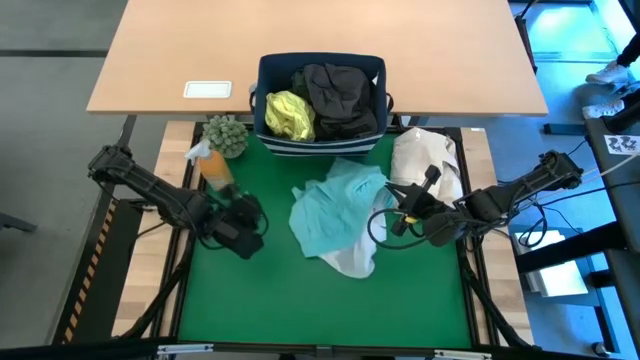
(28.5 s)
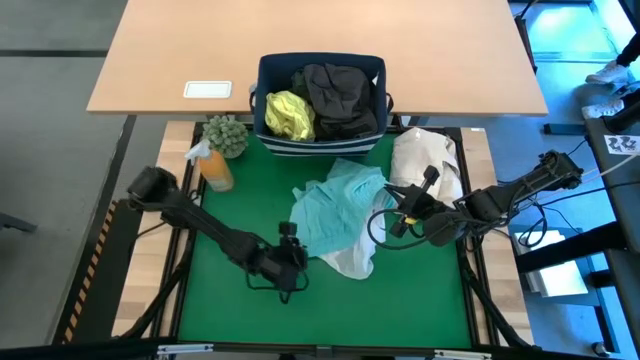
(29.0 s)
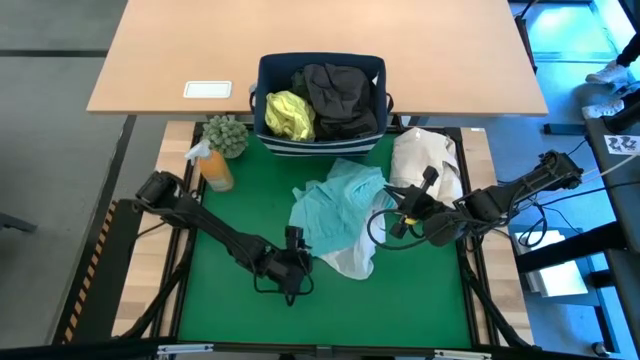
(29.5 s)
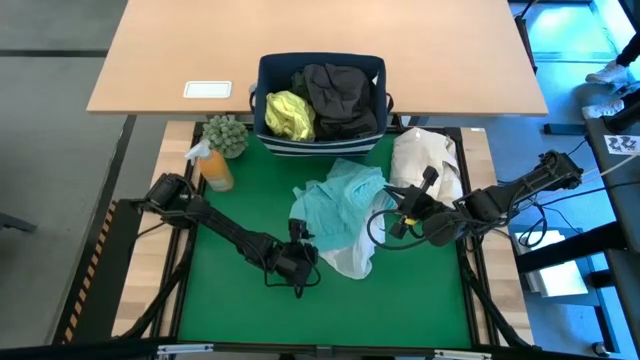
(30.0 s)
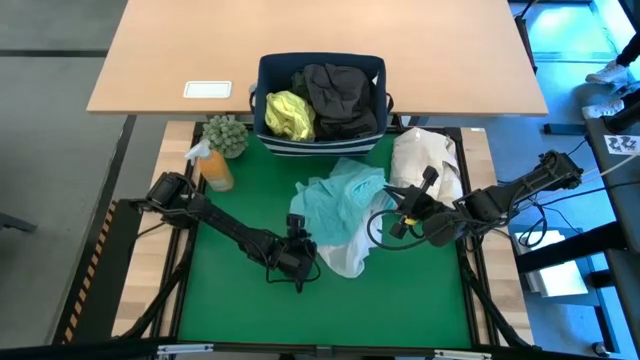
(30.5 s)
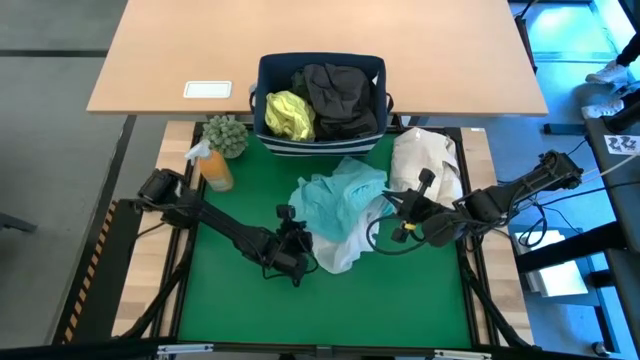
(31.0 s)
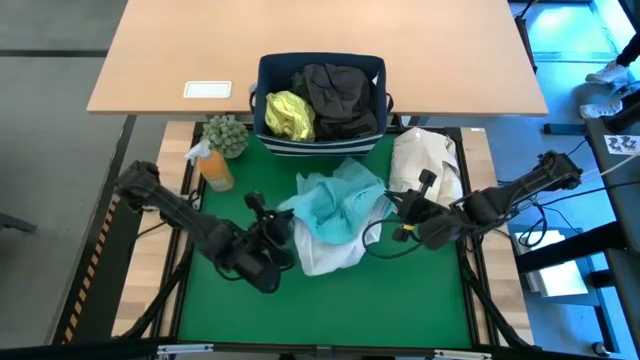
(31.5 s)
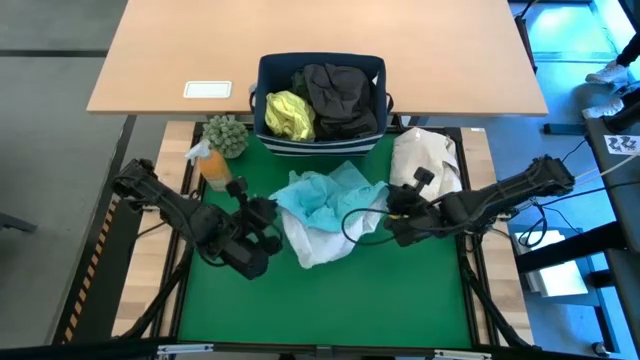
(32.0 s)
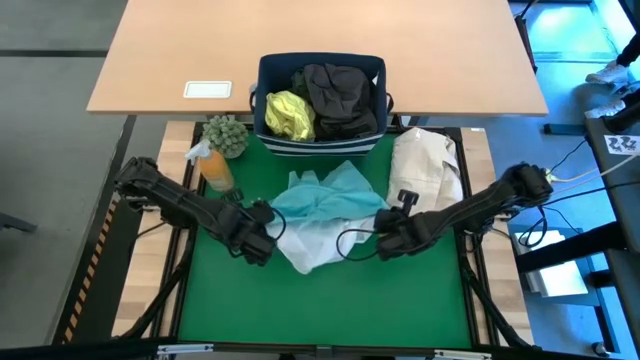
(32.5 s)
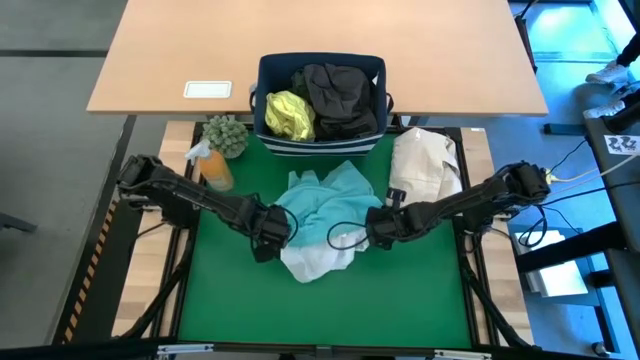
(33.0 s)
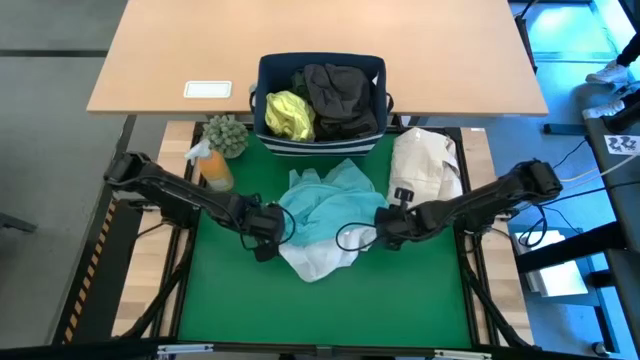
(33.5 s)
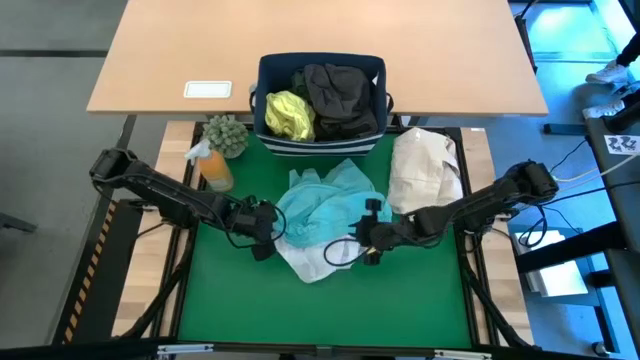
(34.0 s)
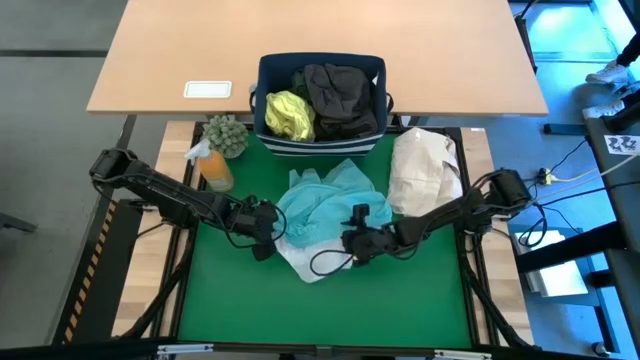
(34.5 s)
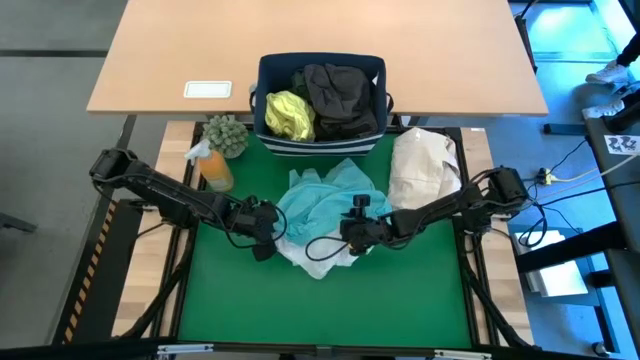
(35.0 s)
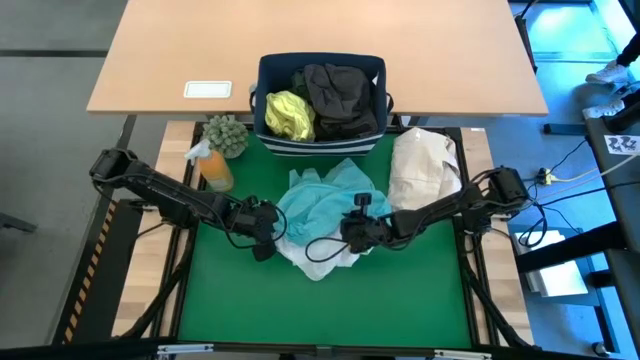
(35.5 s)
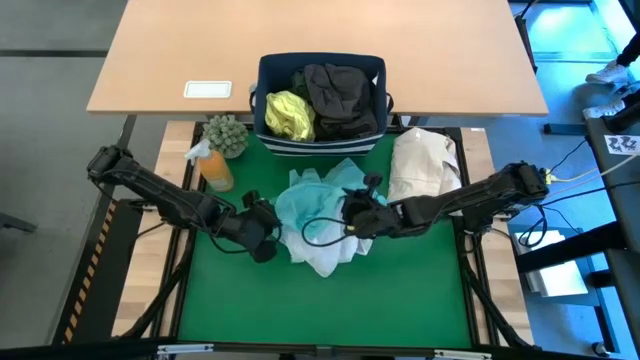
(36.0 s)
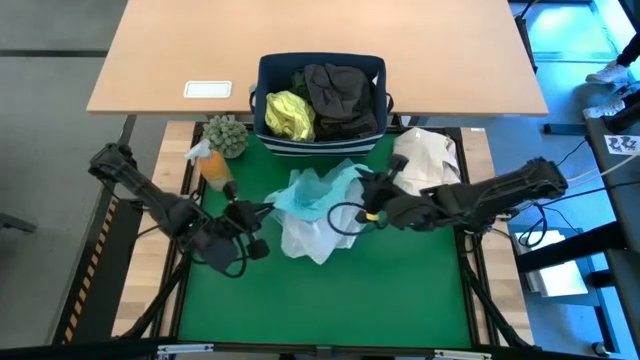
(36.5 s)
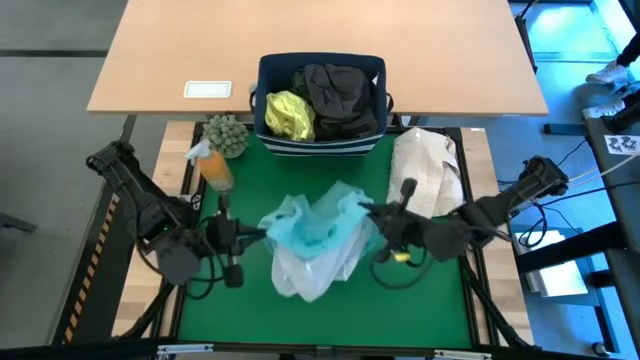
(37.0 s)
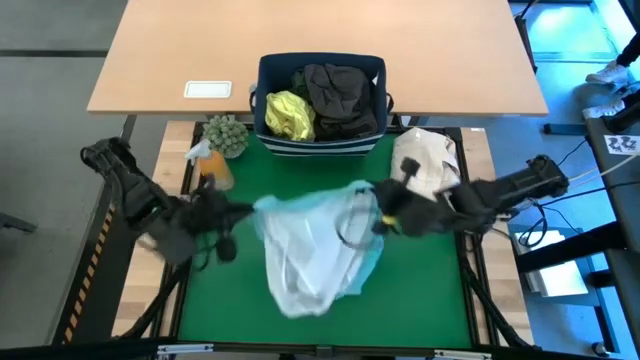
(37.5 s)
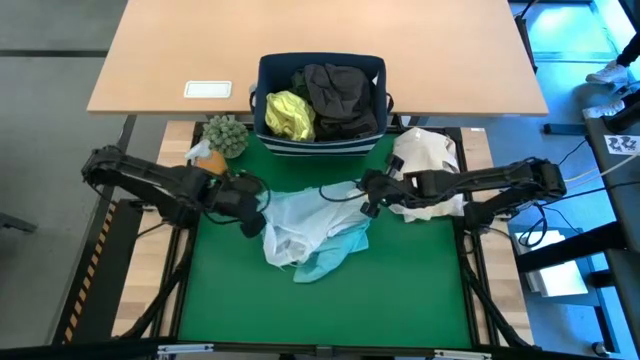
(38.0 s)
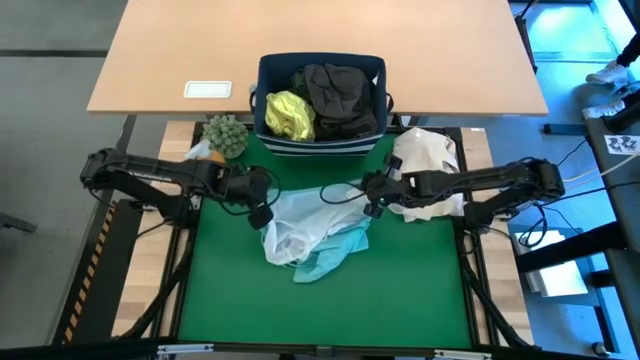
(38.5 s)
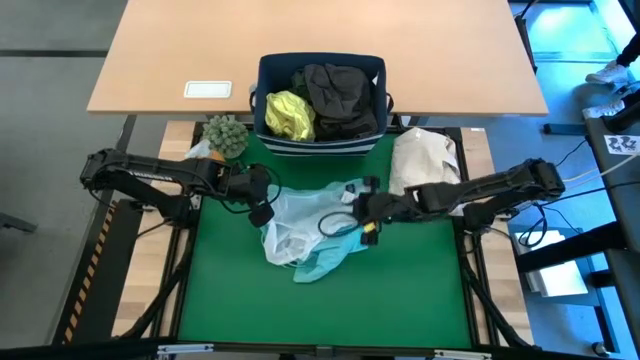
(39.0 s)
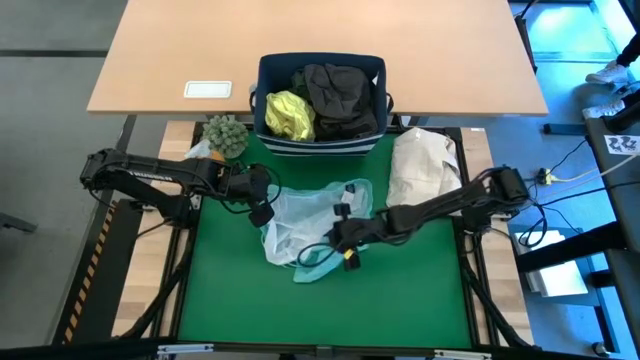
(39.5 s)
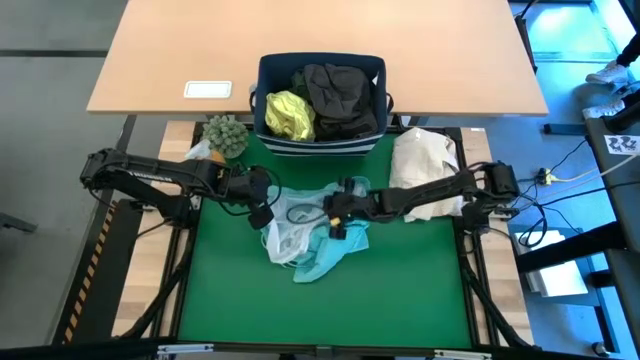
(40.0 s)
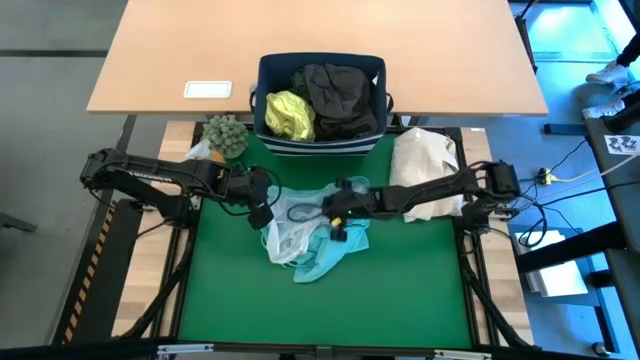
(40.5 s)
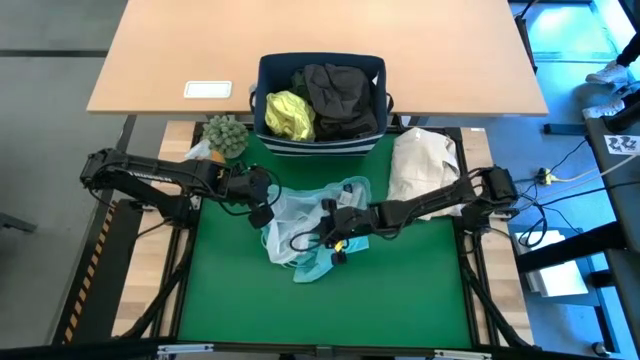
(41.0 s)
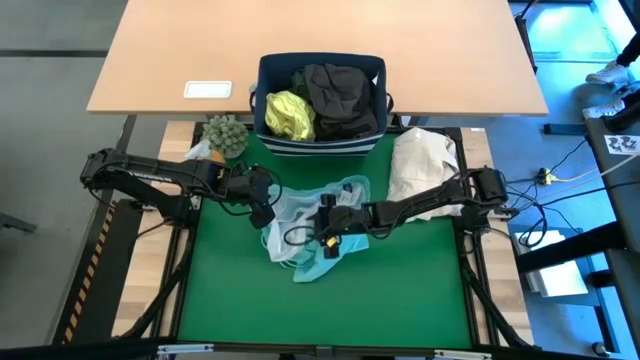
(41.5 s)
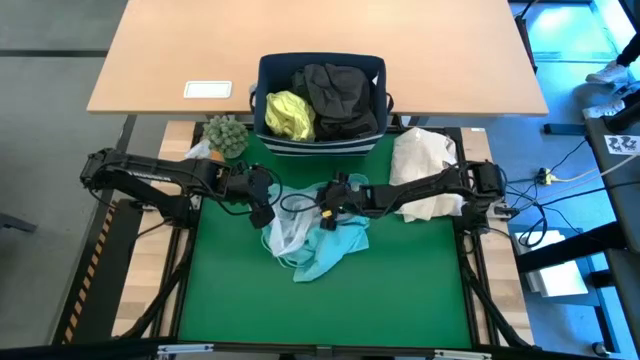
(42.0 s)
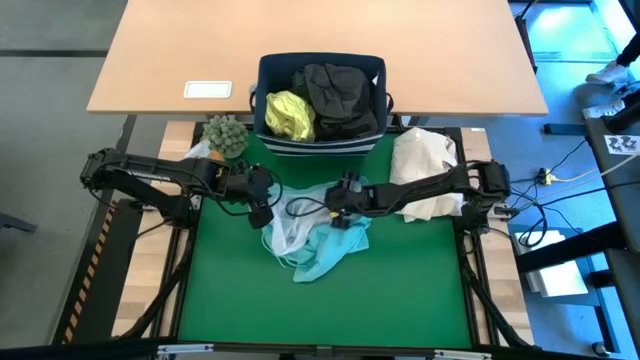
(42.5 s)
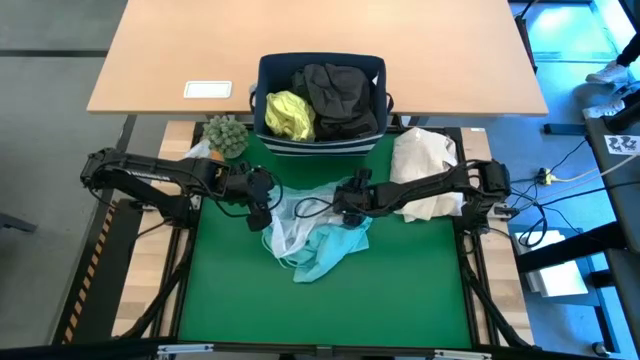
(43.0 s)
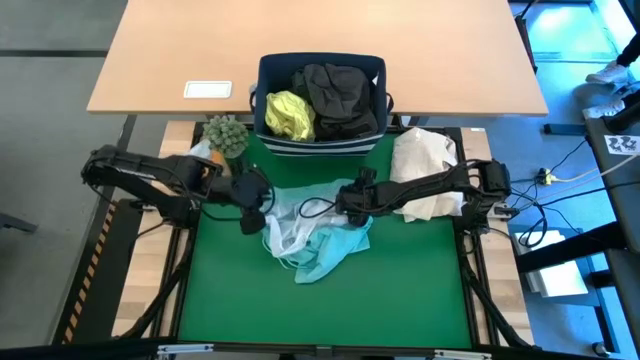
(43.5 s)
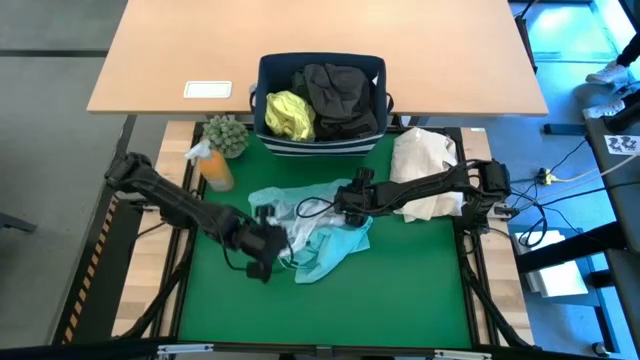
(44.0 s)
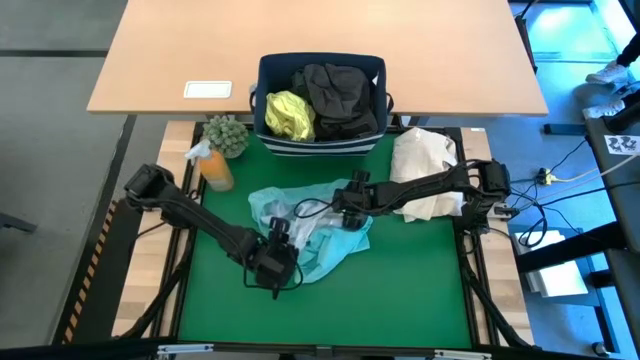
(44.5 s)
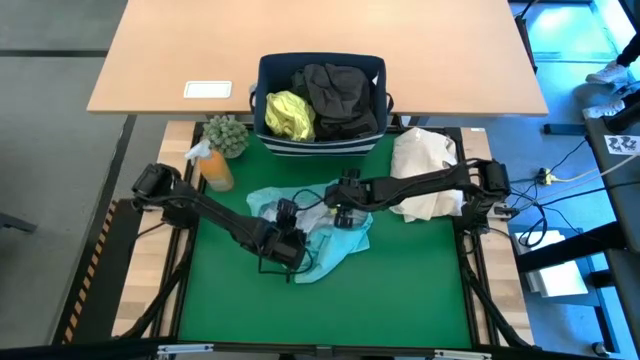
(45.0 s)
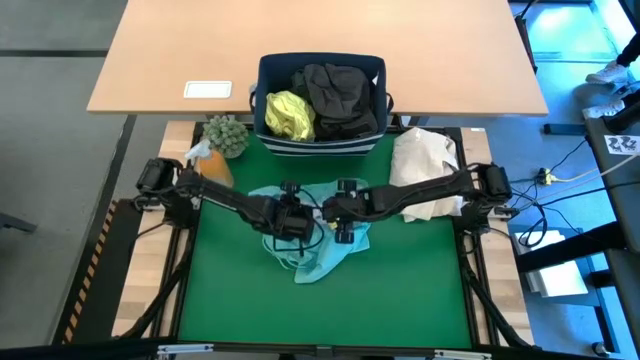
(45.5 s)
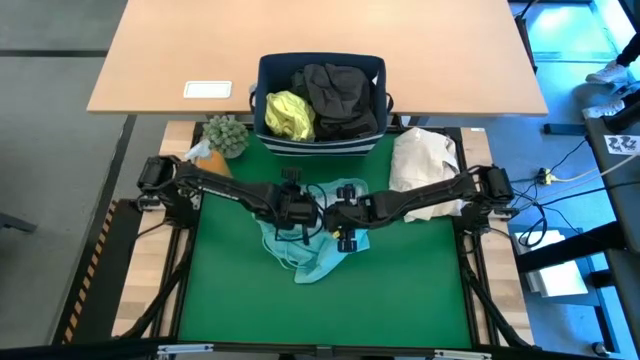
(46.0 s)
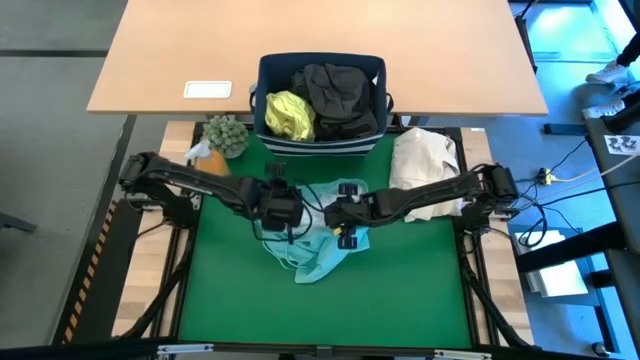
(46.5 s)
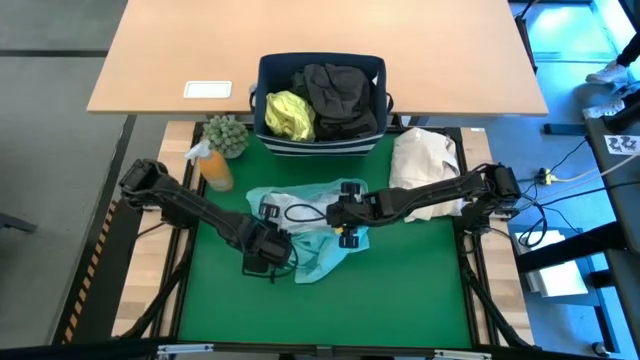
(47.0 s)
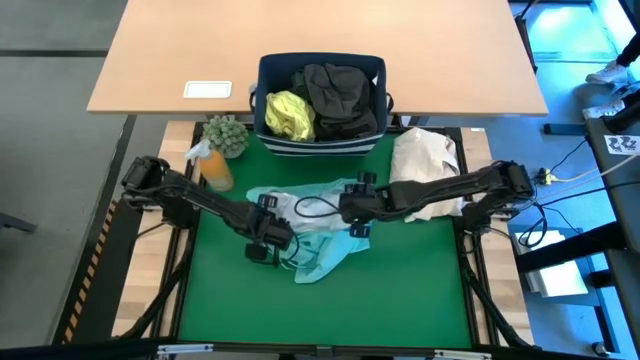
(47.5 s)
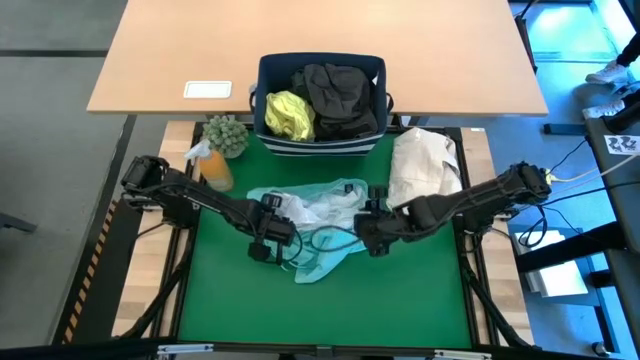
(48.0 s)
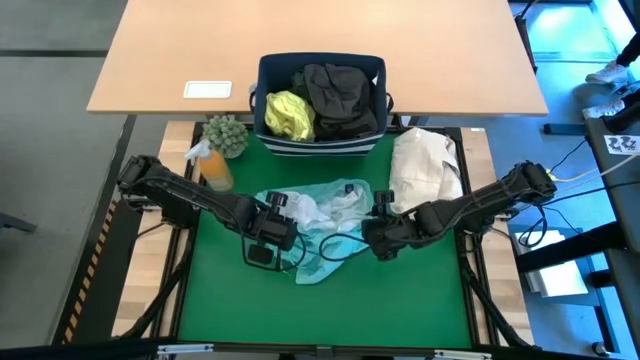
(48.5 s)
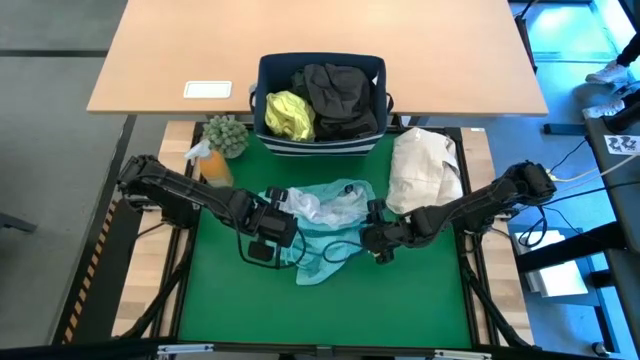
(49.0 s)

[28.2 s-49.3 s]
Task: Fold laundry
Fold the blue shorts
